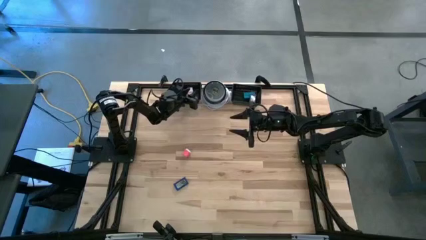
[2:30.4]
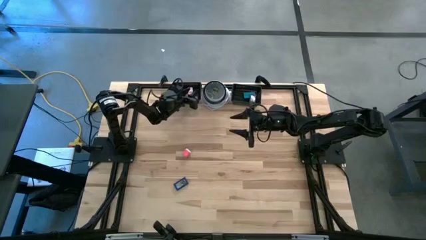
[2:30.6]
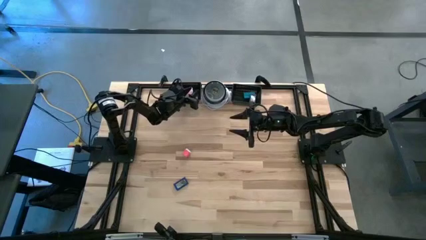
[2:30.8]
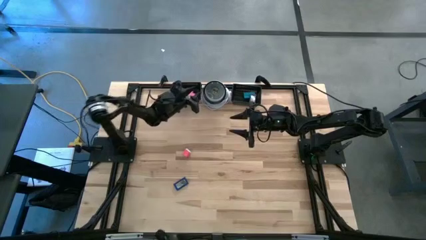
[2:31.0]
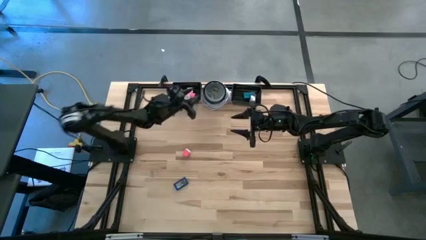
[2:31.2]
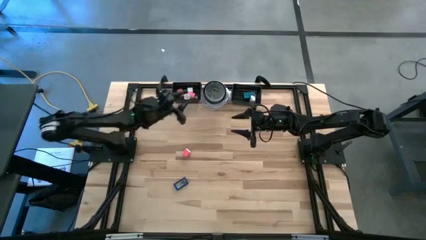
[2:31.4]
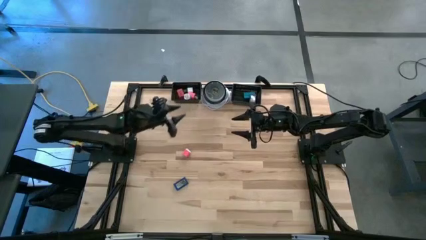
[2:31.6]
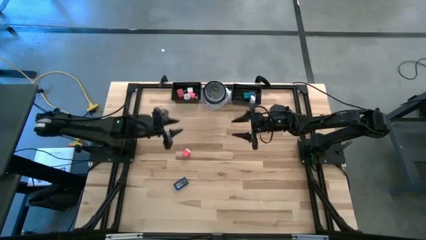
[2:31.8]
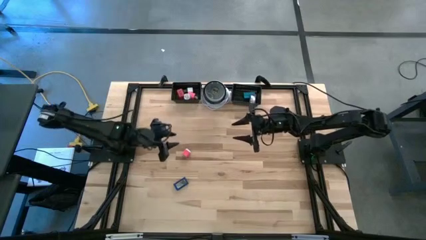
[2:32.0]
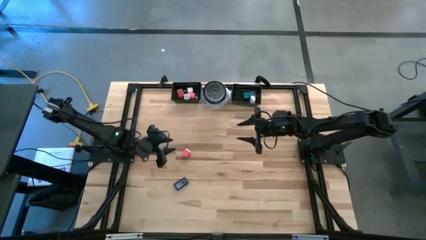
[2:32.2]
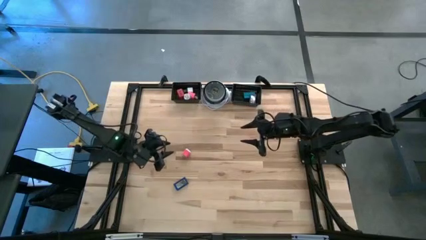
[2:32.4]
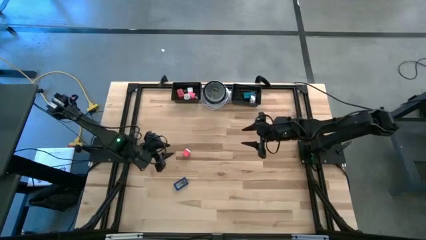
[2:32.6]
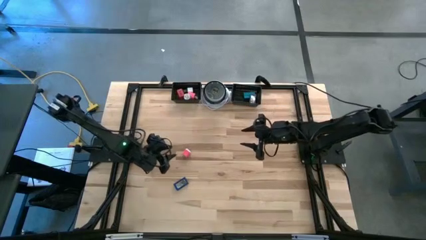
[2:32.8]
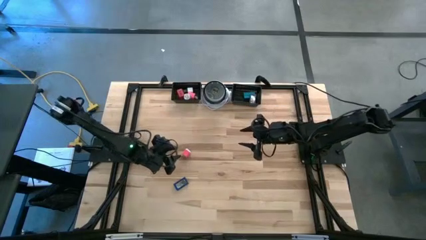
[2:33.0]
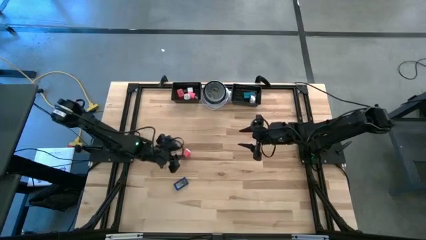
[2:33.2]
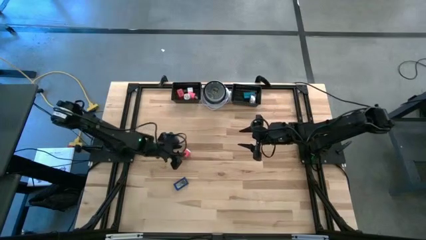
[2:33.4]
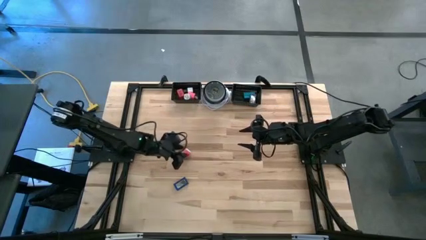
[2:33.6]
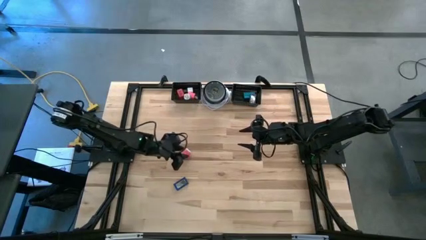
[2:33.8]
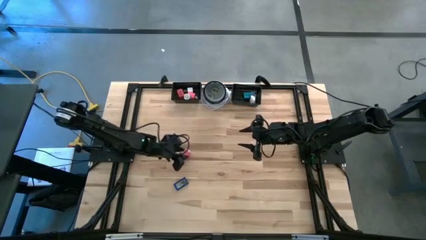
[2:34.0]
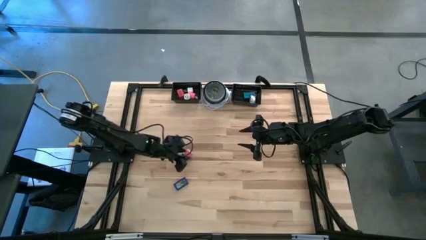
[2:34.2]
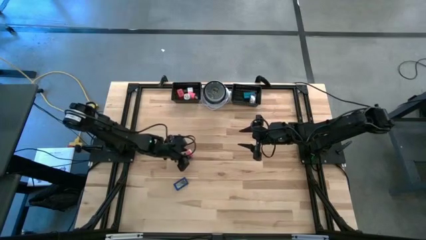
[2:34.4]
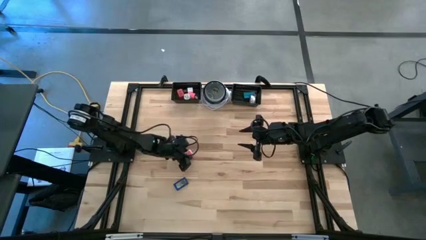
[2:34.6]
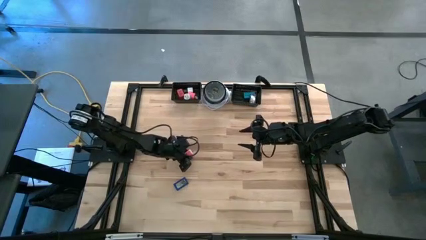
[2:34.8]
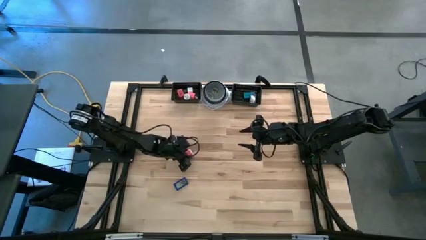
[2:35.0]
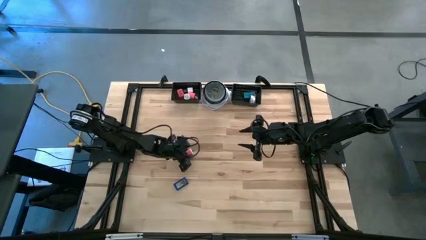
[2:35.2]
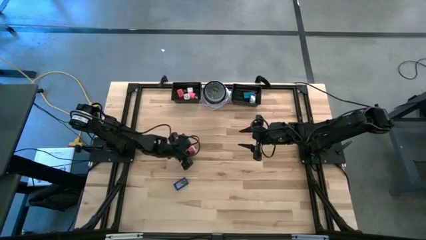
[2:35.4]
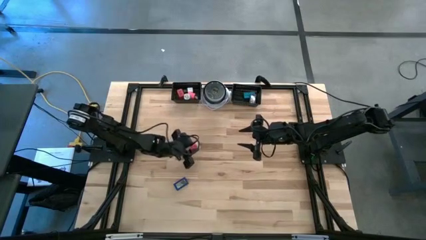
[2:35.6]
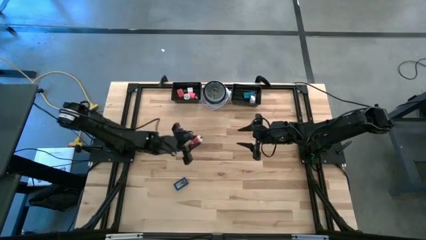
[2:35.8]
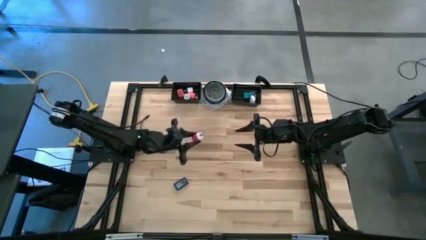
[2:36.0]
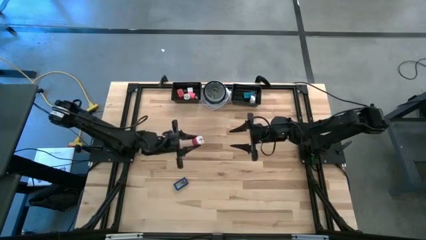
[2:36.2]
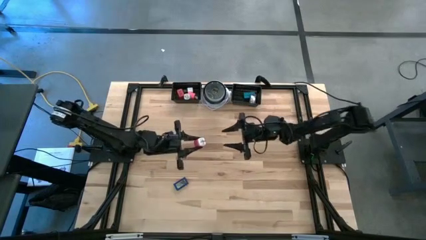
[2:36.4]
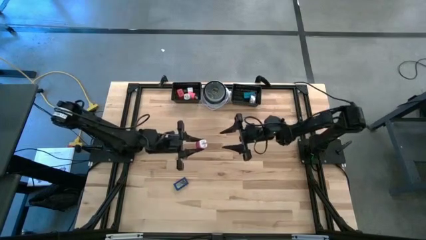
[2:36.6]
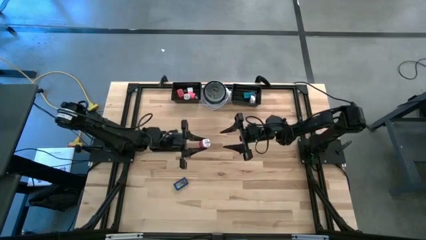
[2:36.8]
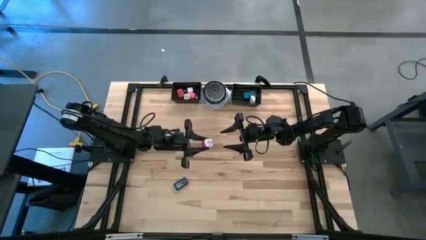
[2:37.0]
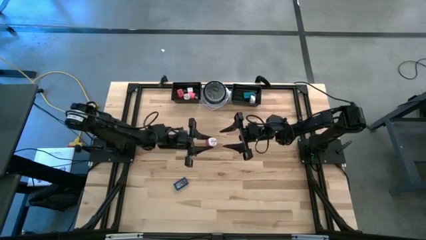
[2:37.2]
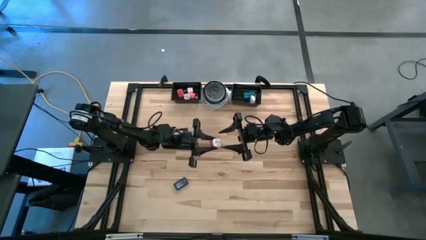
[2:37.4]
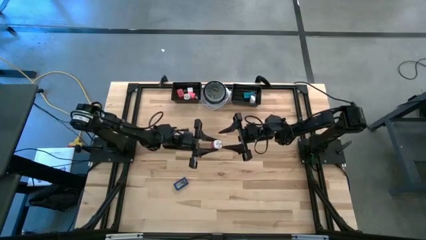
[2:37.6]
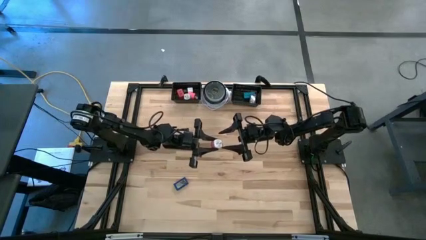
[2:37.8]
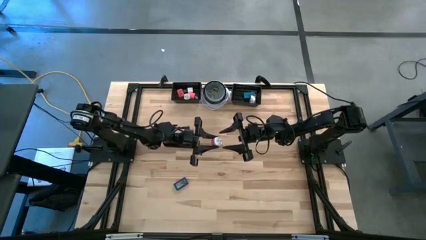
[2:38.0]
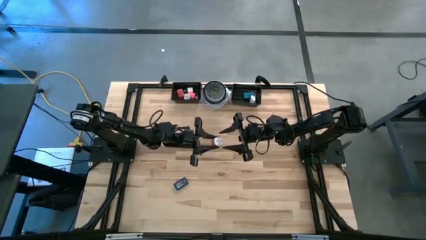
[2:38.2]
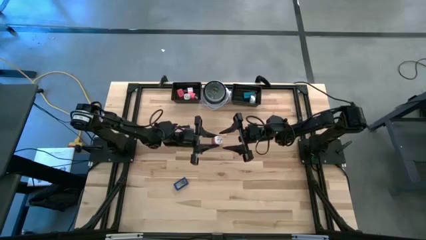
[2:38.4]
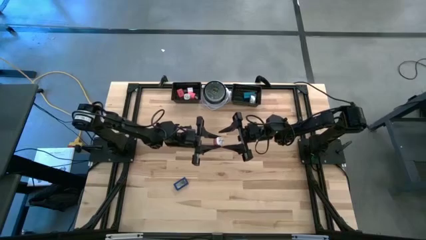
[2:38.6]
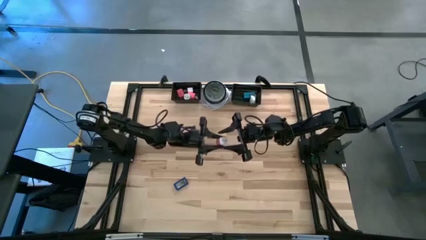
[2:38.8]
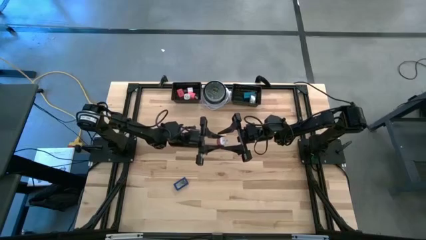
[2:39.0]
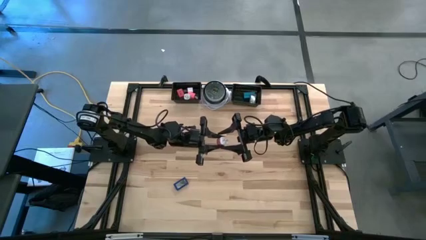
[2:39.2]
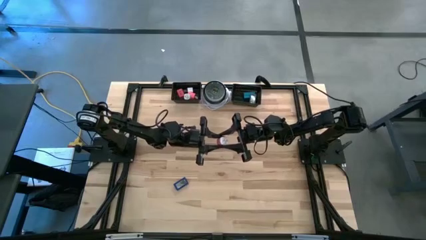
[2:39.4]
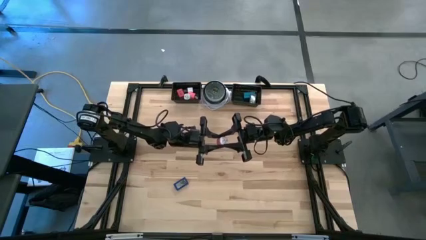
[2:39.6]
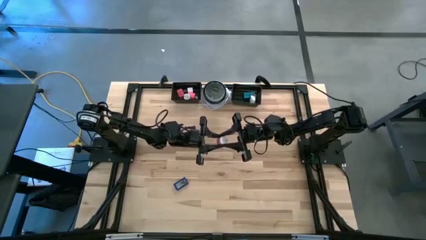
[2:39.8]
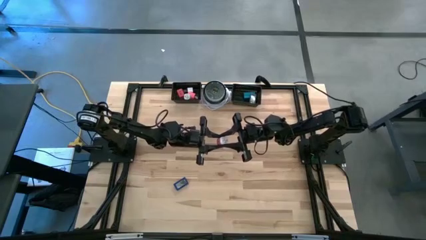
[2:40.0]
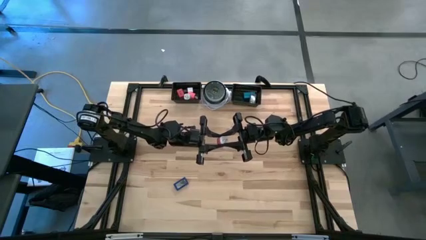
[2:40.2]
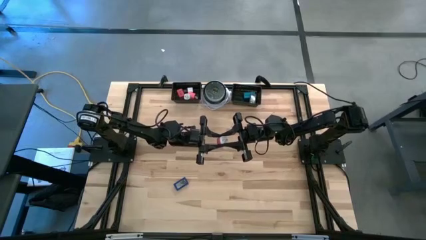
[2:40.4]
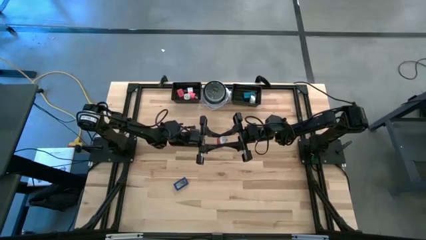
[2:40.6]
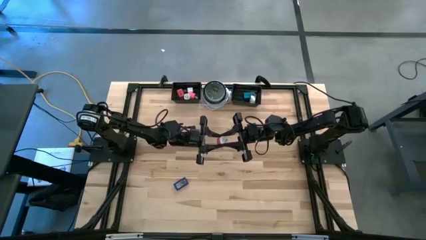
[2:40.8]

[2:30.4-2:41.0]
Task: Pick & Place Office items
Put the pink charger adapter into the left black basket
